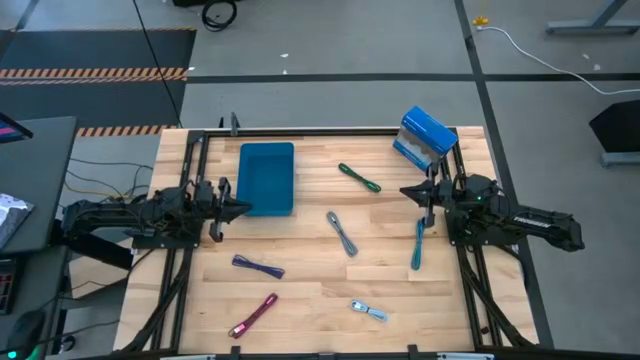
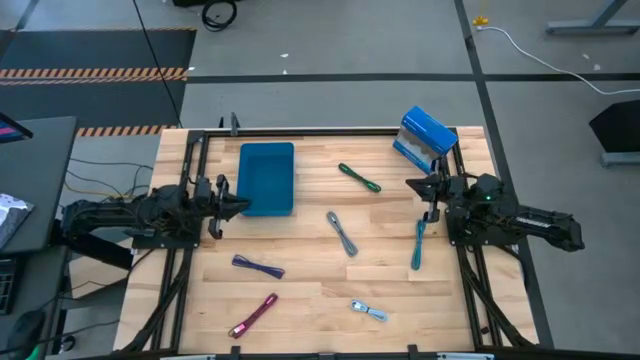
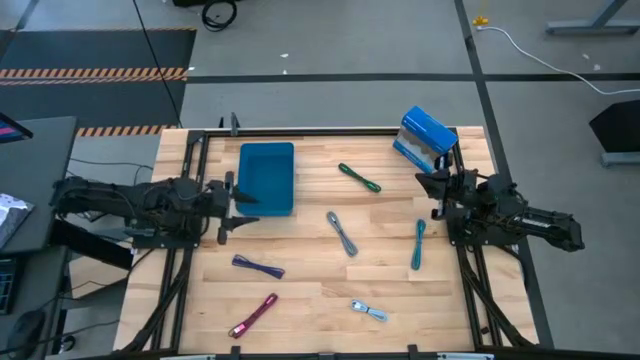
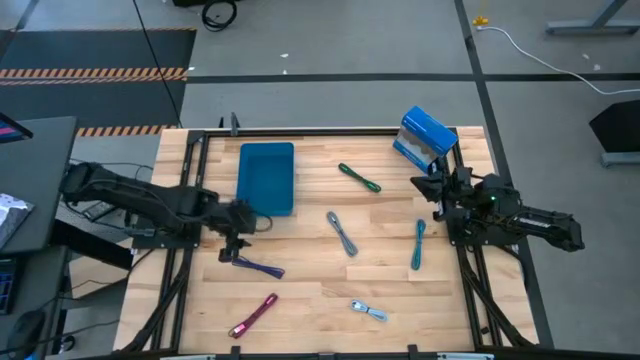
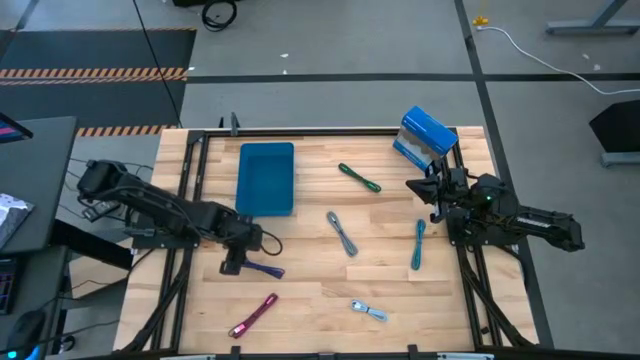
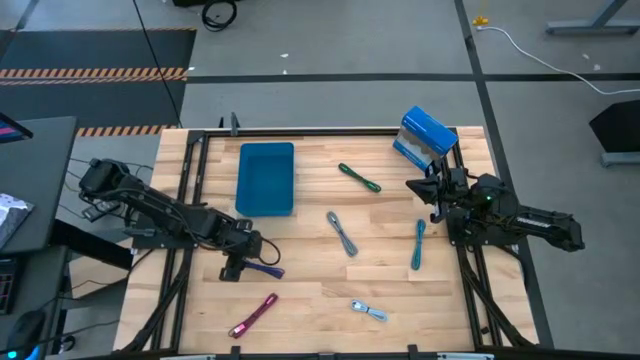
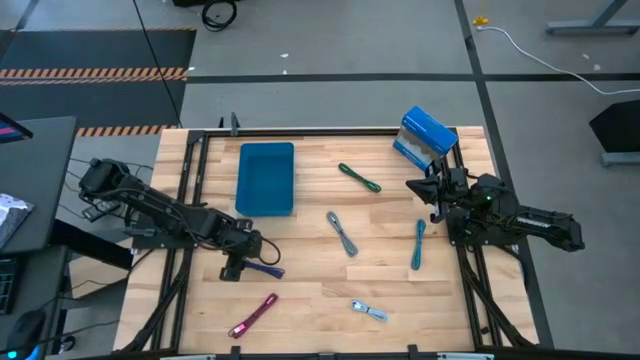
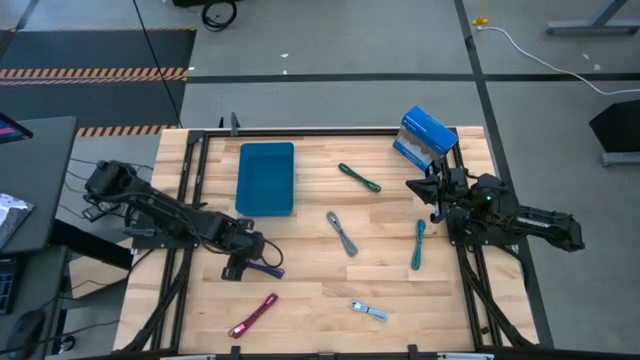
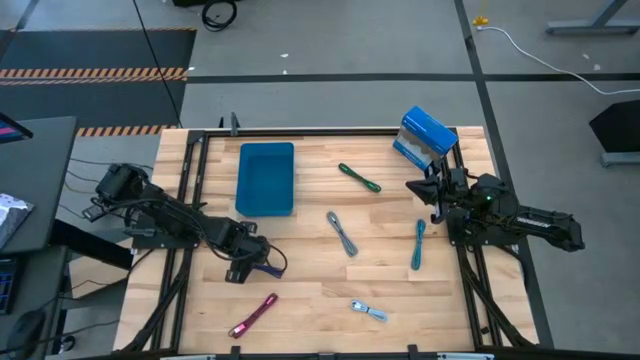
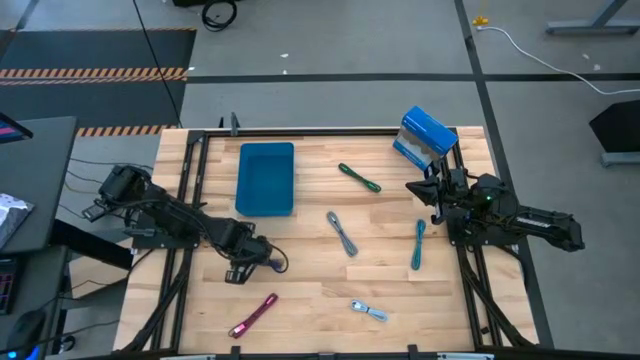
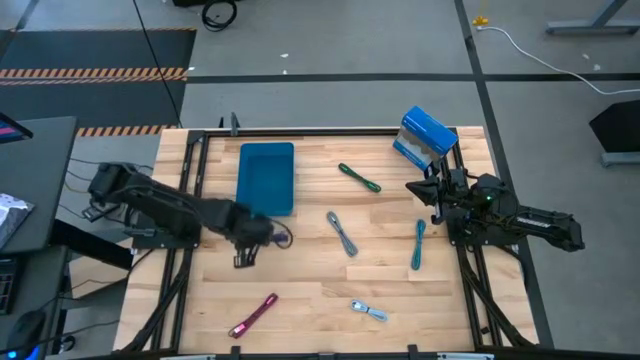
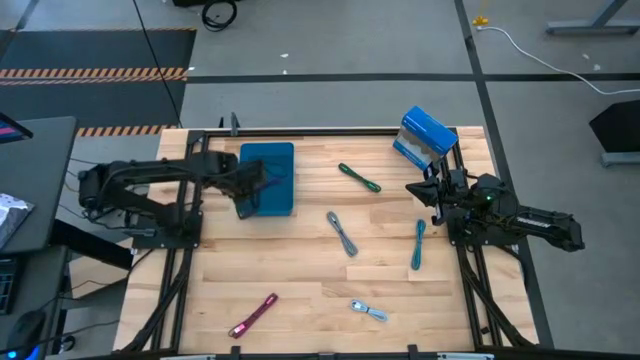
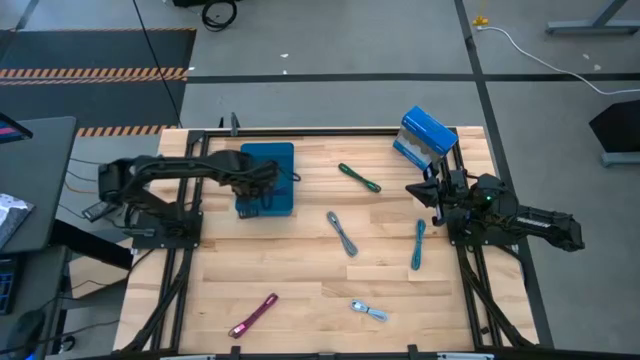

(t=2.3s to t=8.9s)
Task: Pick and place USB-C Cables
Put the dark blue charger cable into the blue bin

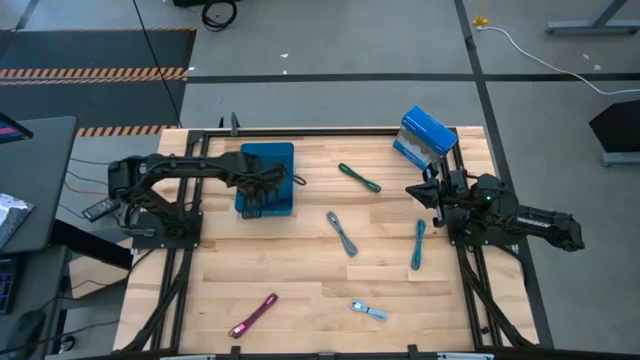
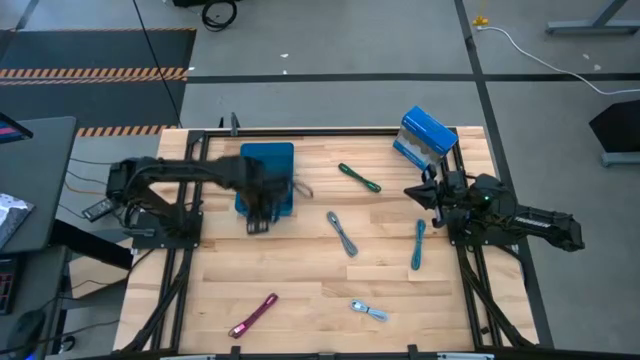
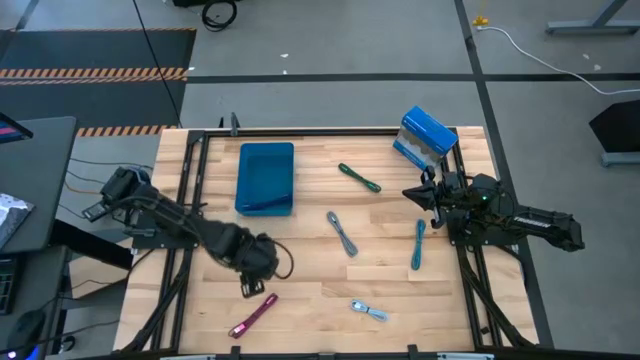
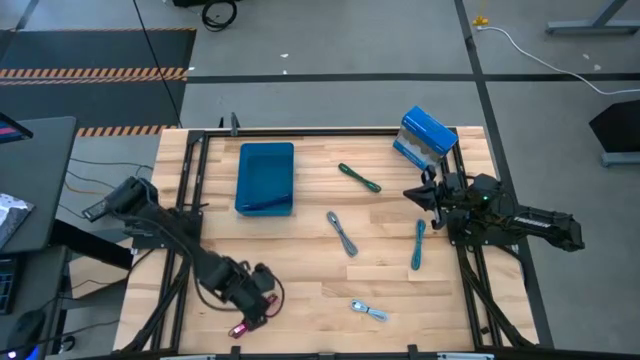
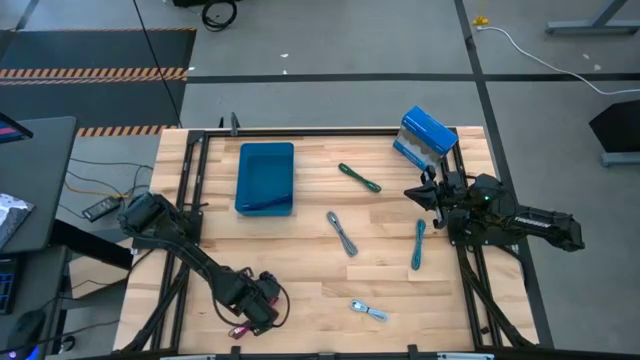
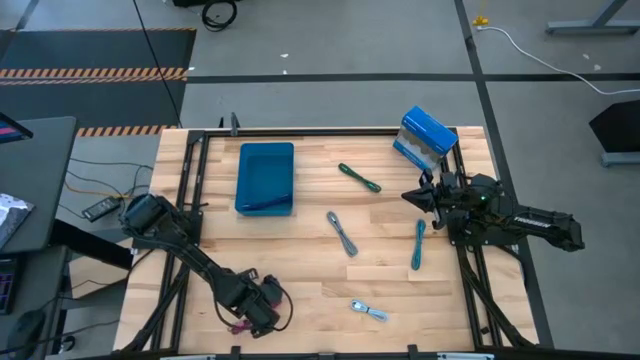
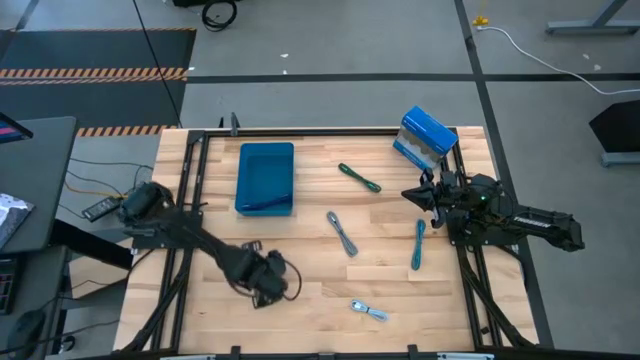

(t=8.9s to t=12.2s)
Put the black pink charger cable into the blue bin

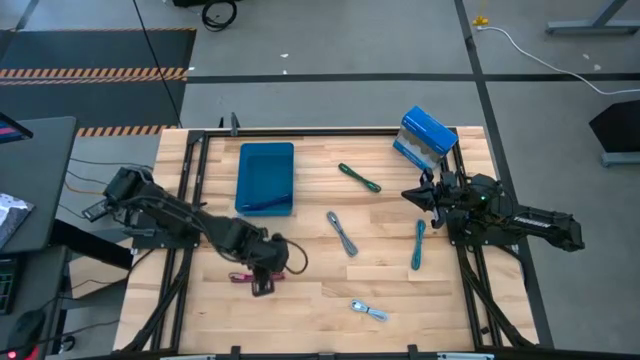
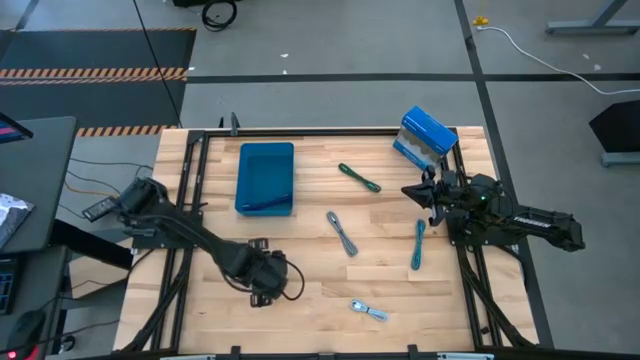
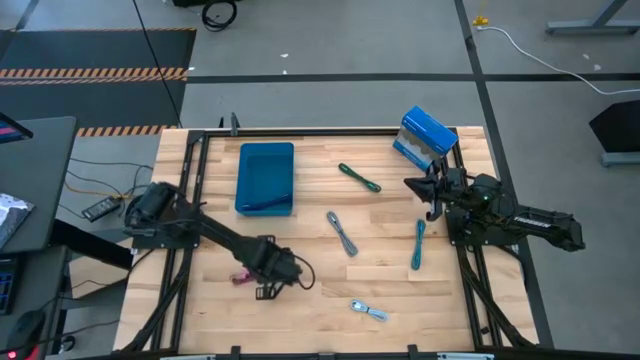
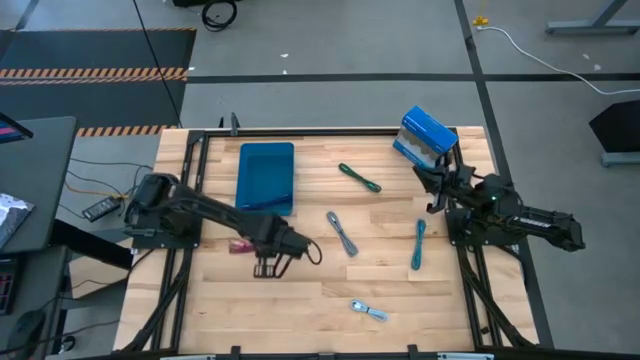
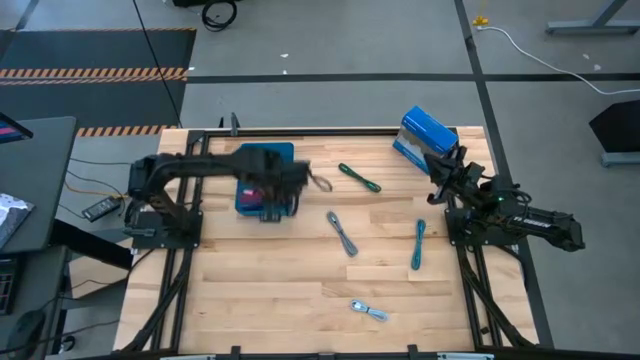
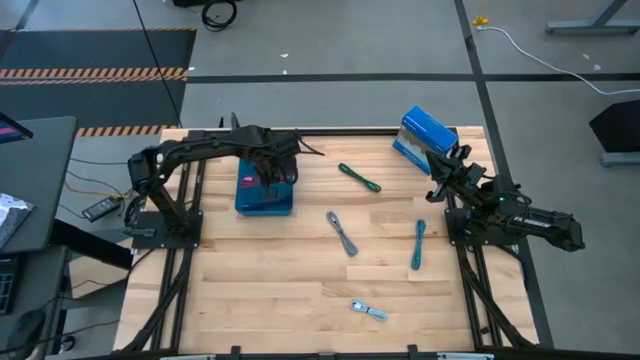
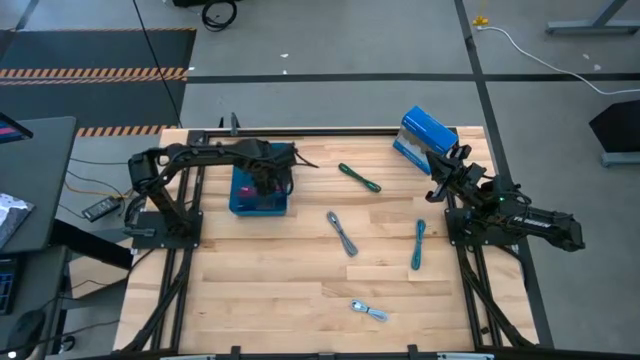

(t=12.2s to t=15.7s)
Put the black pink charger cable into the blue bin

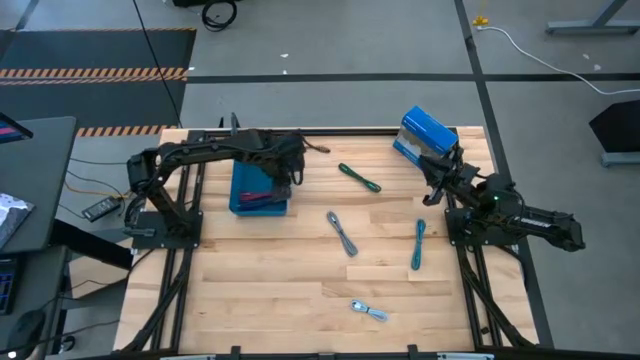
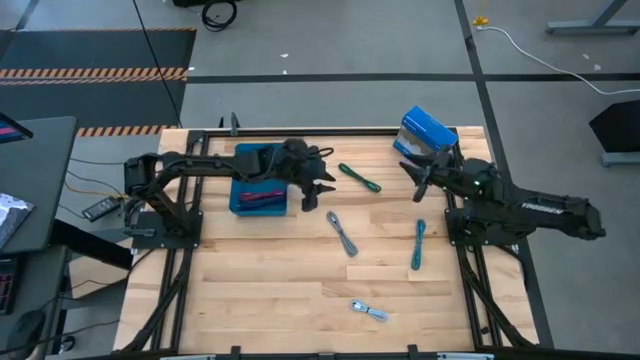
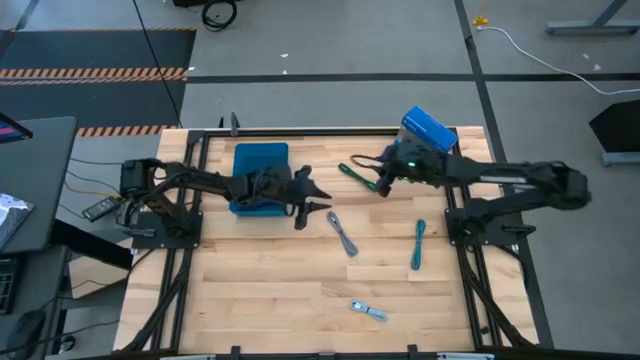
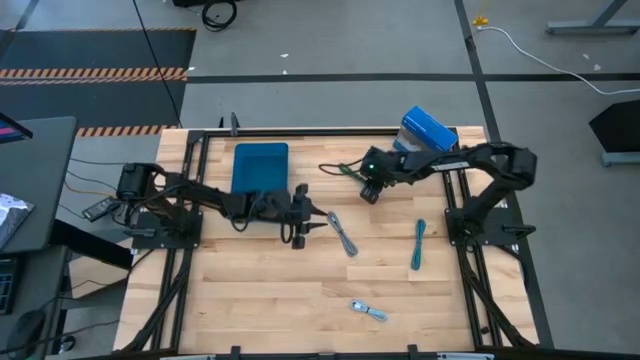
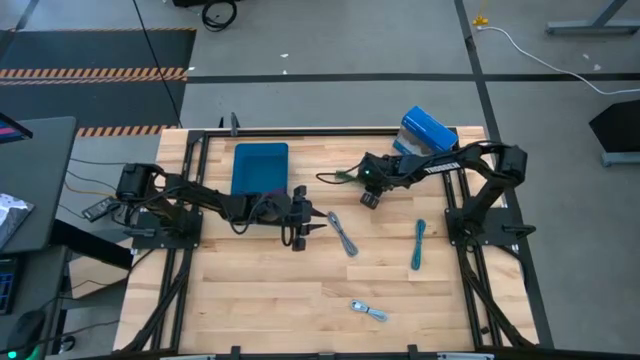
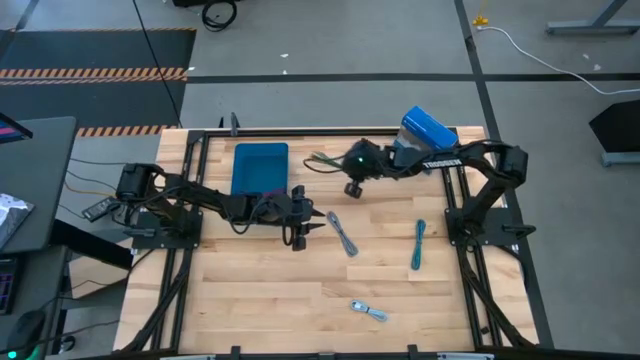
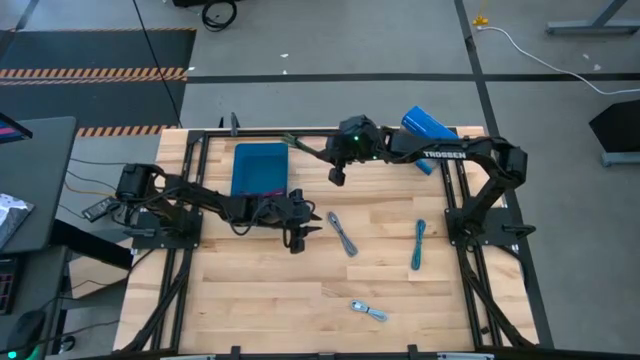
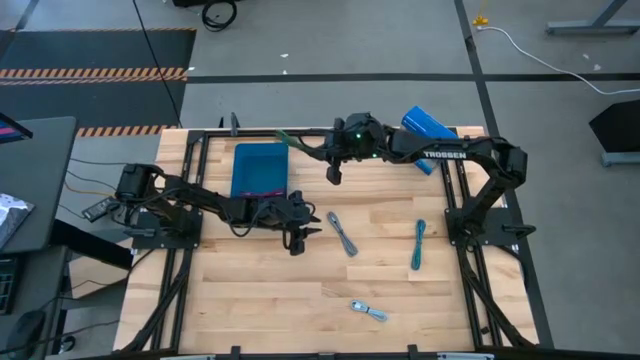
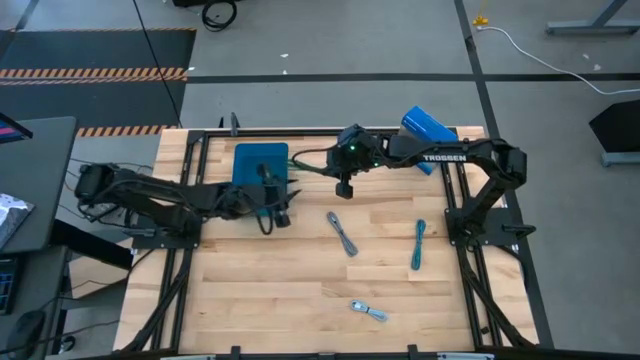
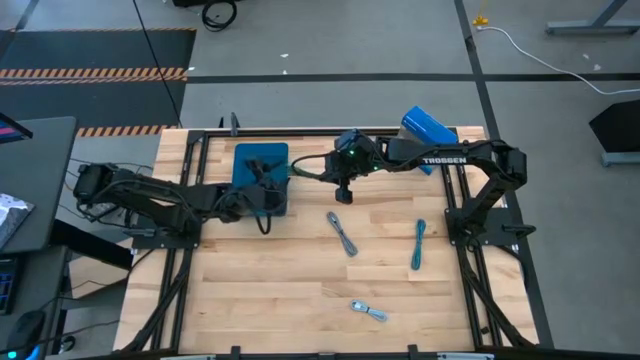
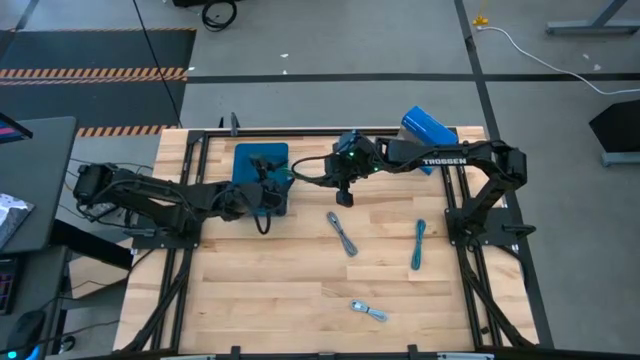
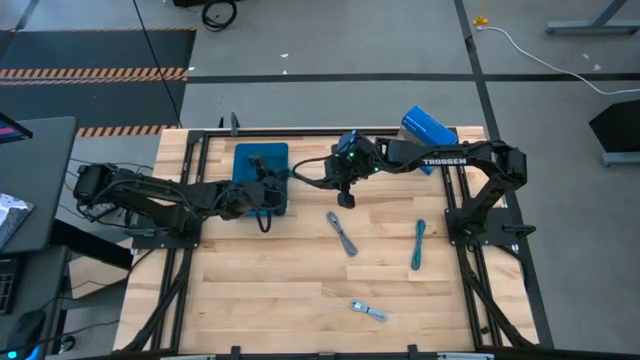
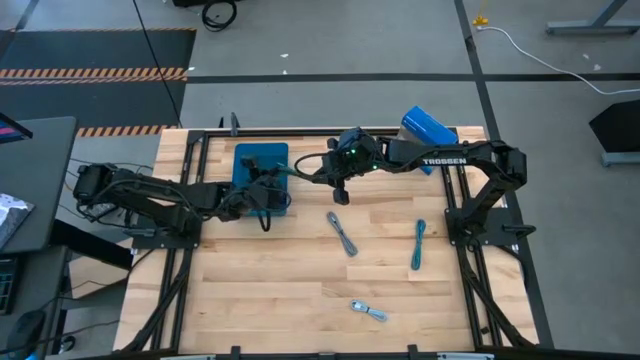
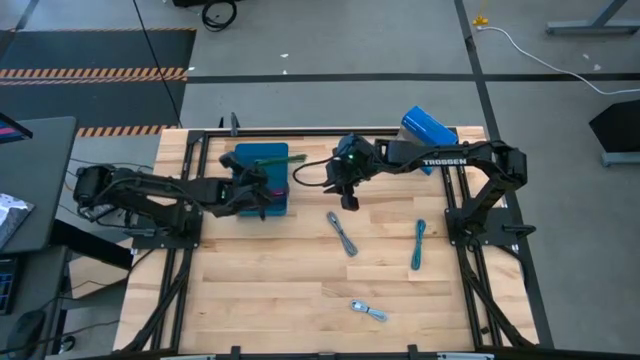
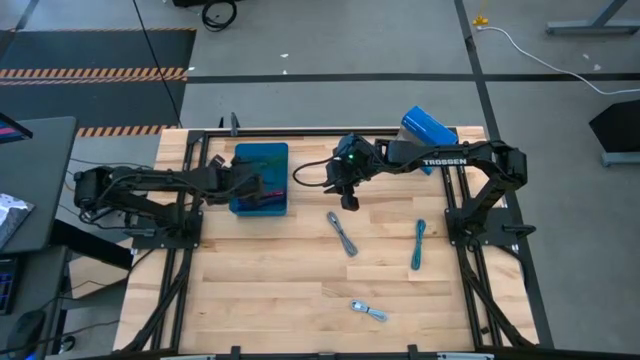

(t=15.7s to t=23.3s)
Put the black green charger cable into the blue bin
